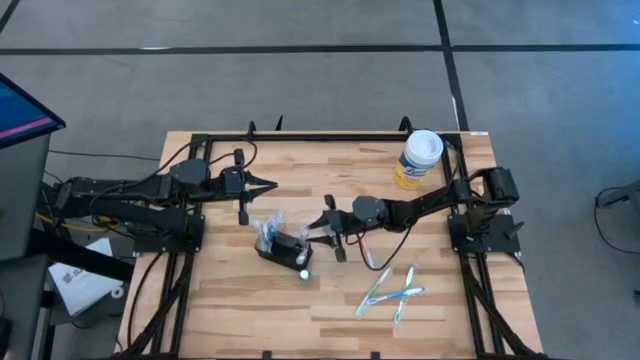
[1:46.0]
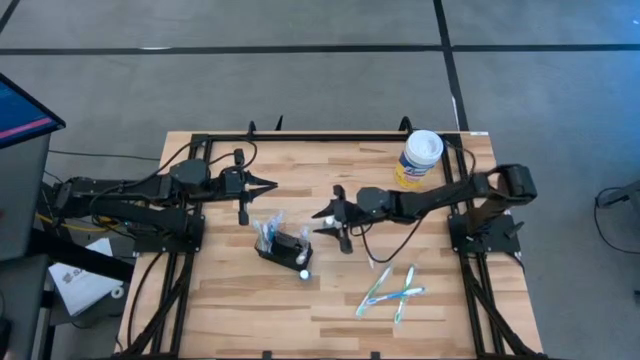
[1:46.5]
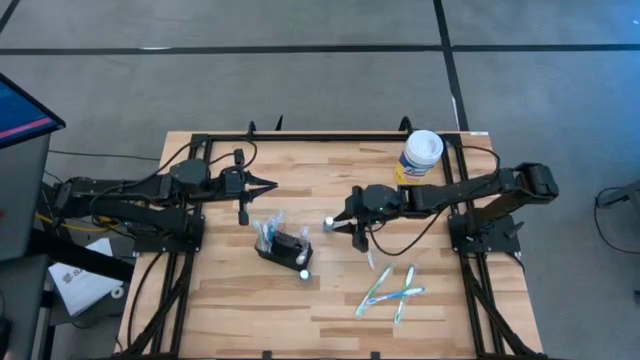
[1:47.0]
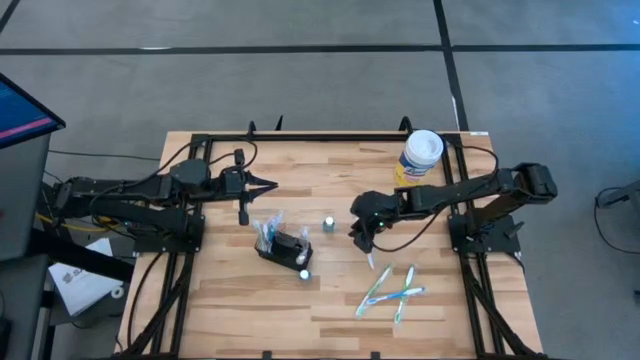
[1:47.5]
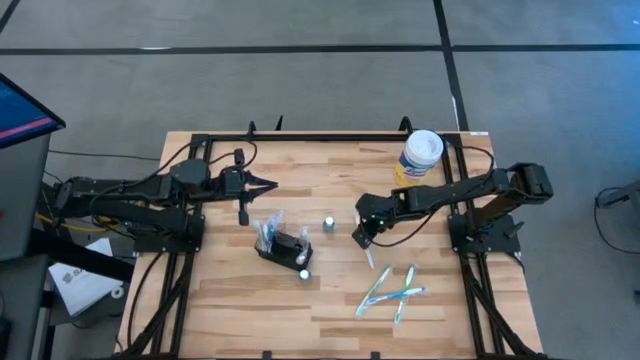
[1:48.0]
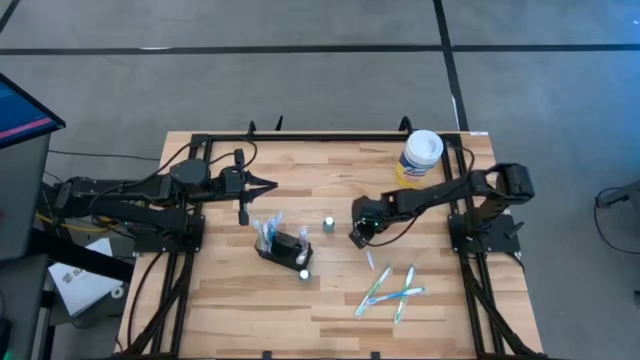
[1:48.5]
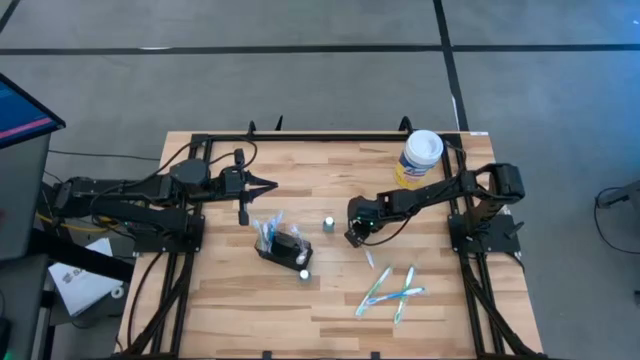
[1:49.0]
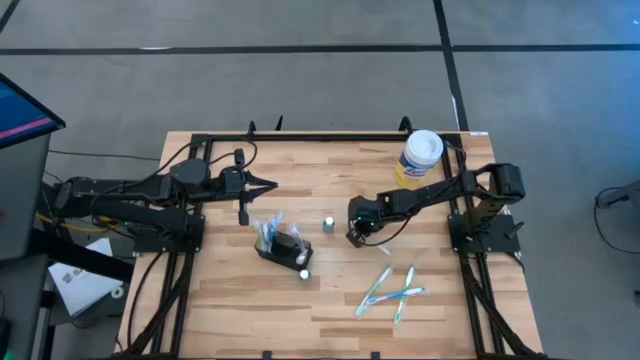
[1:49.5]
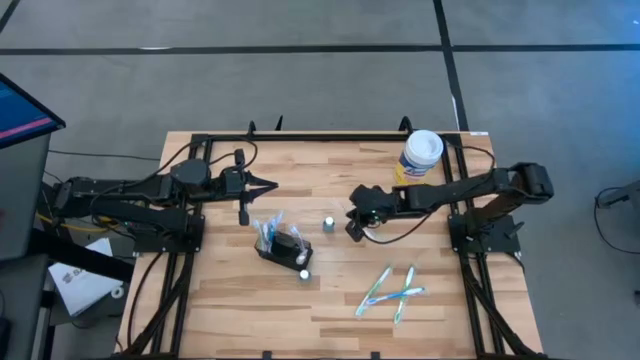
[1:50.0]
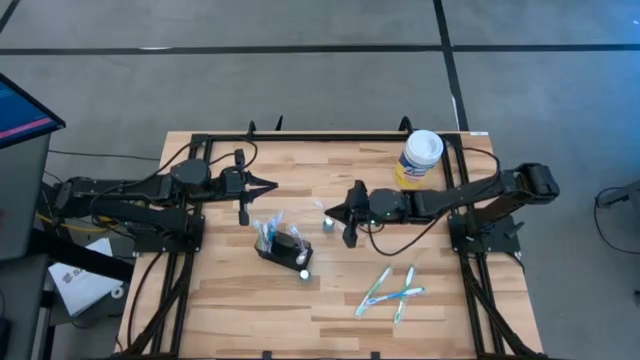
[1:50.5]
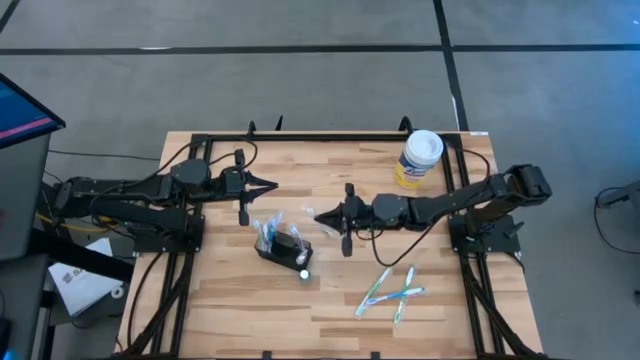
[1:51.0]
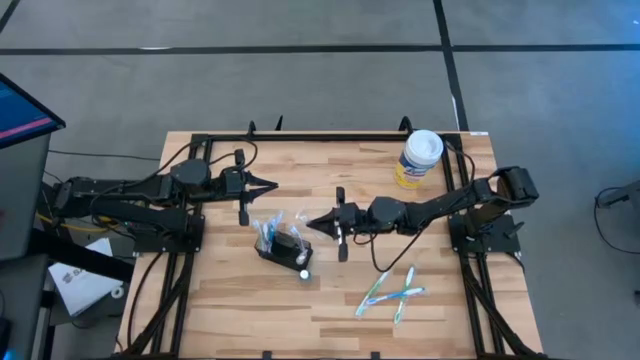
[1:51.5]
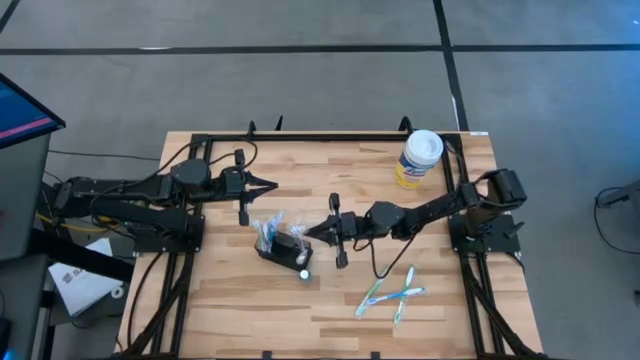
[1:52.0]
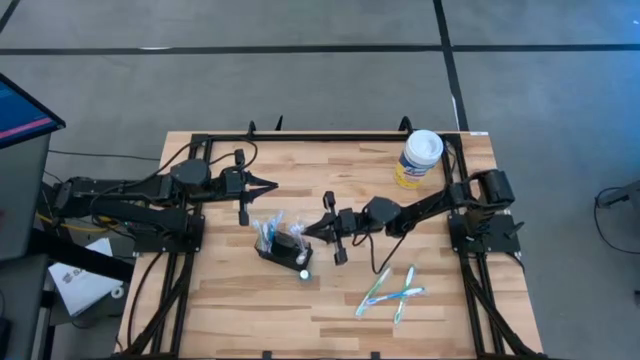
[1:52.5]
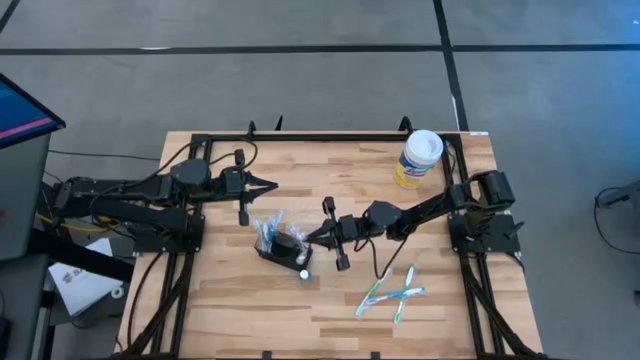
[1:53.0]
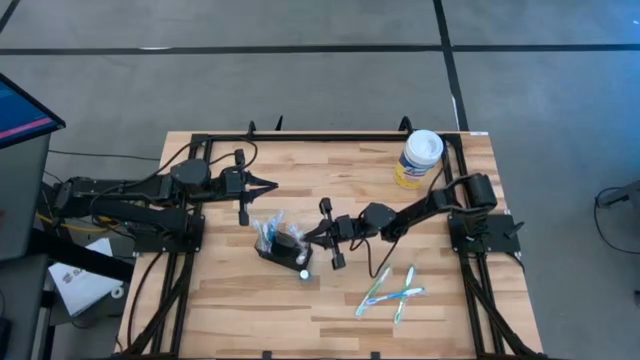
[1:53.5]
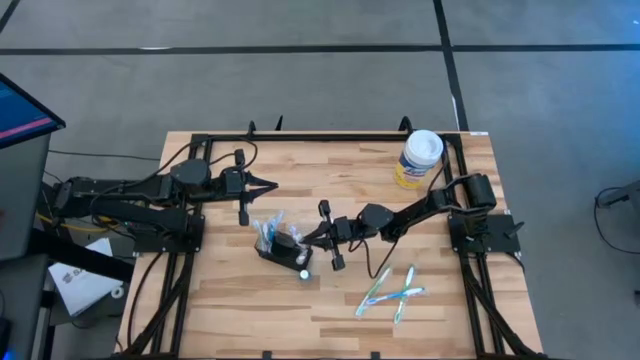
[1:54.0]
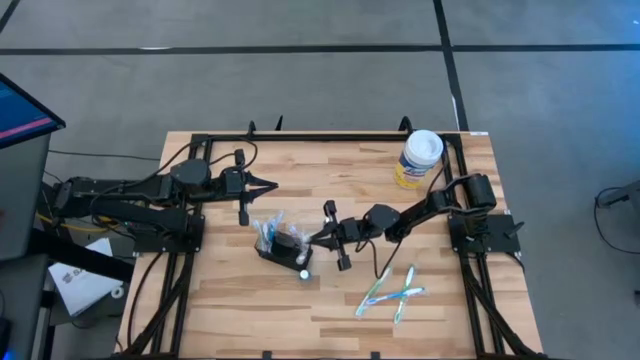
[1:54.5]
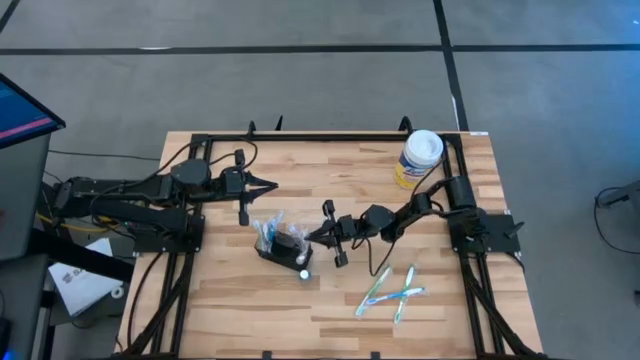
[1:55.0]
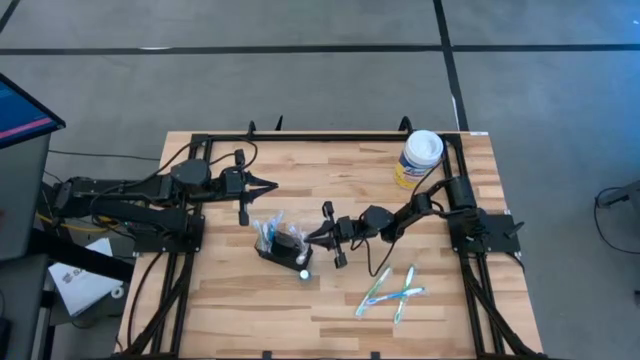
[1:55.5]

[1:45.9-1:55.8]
Task: Pick & Place toothbrushing station
Put the orange toothbrush into the right compartment of the wire organizer

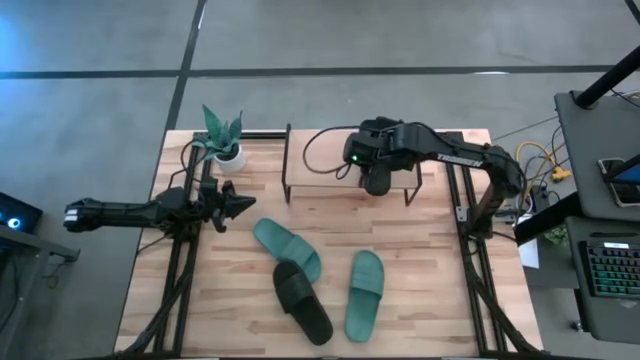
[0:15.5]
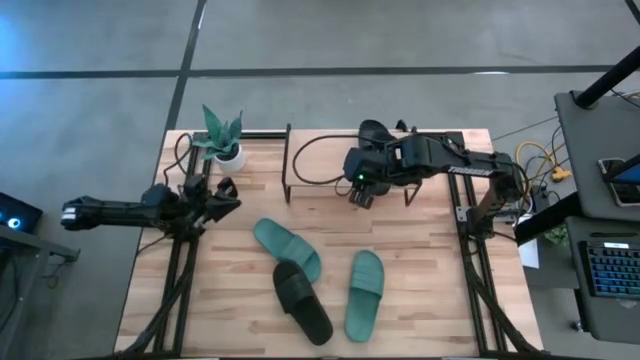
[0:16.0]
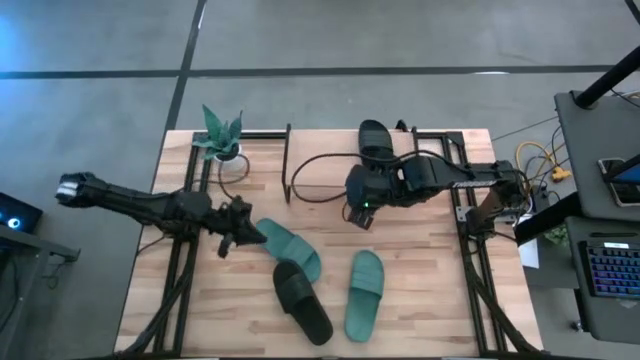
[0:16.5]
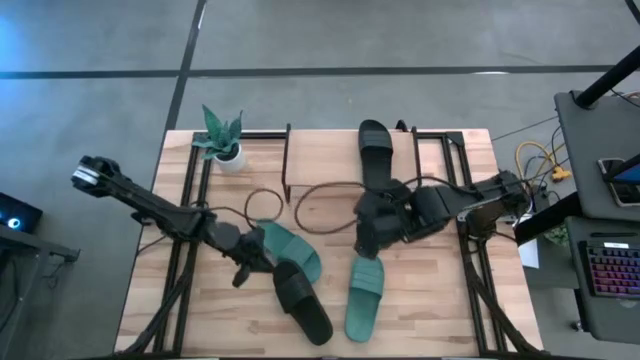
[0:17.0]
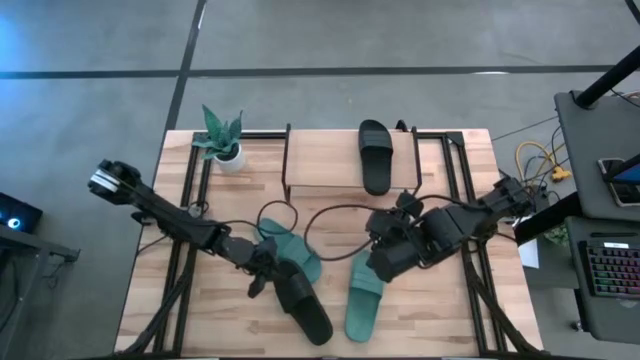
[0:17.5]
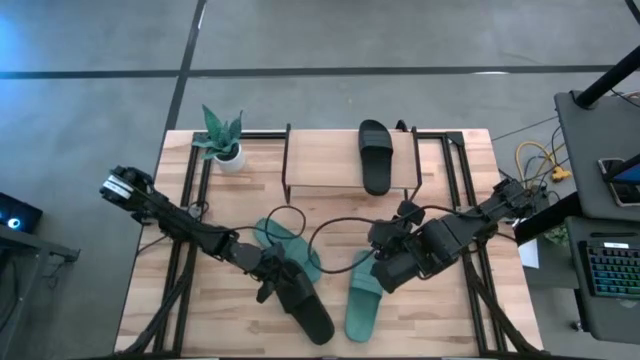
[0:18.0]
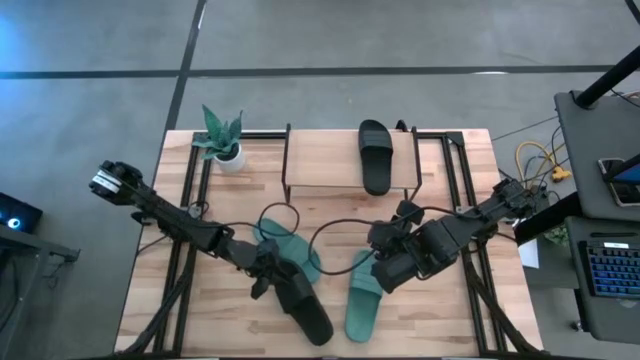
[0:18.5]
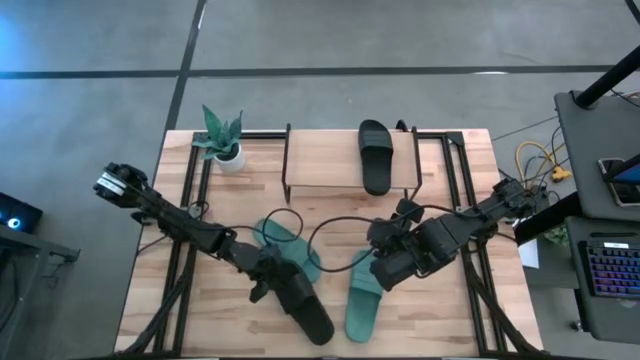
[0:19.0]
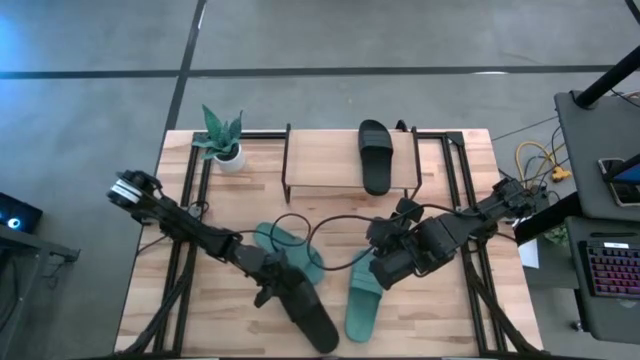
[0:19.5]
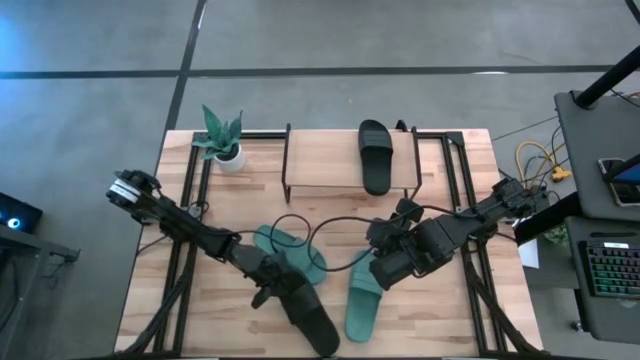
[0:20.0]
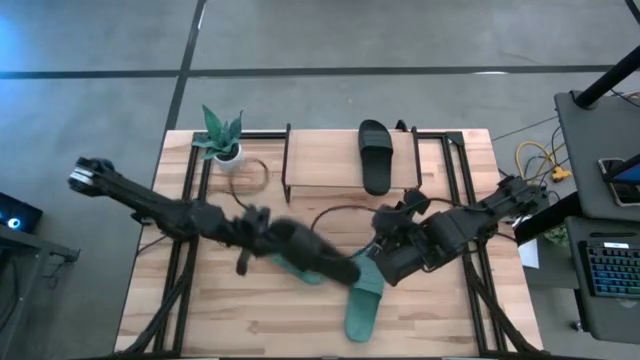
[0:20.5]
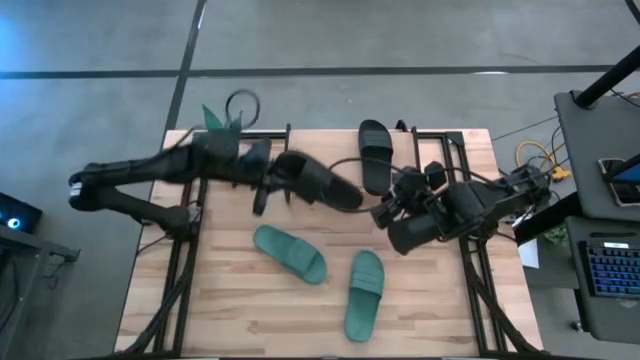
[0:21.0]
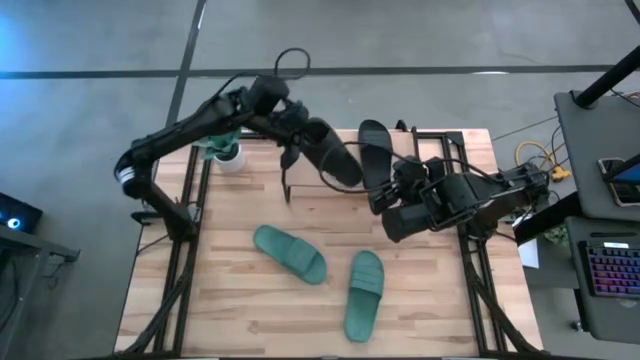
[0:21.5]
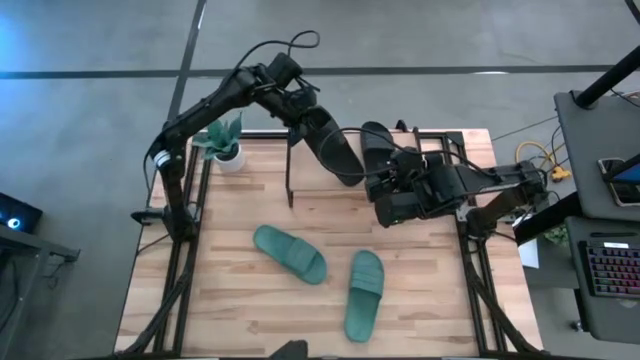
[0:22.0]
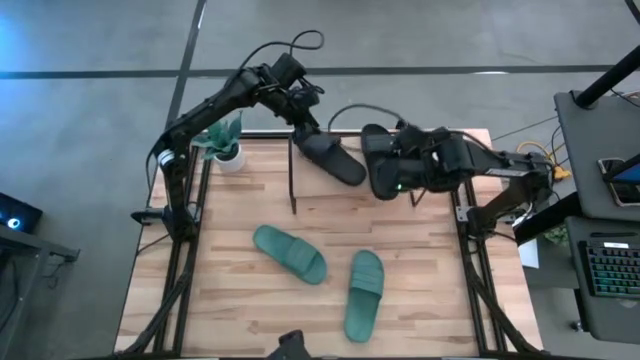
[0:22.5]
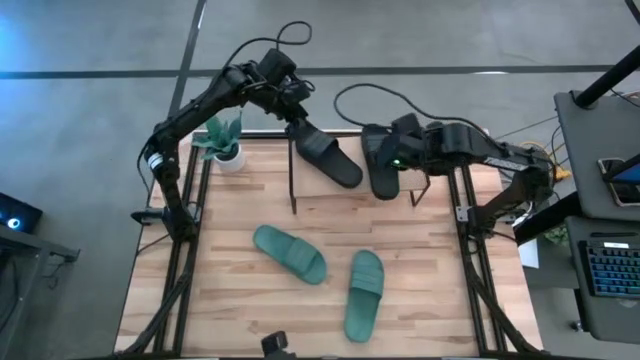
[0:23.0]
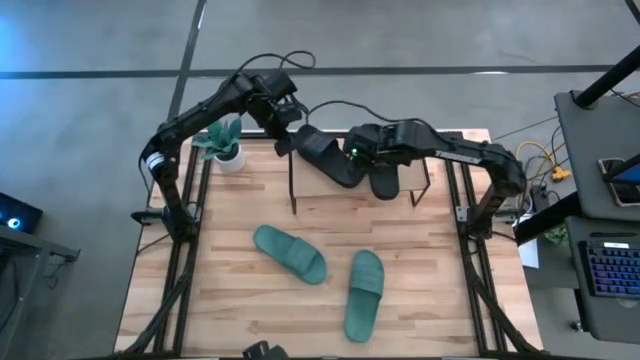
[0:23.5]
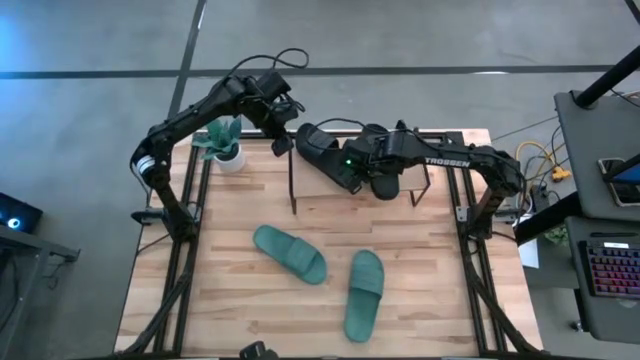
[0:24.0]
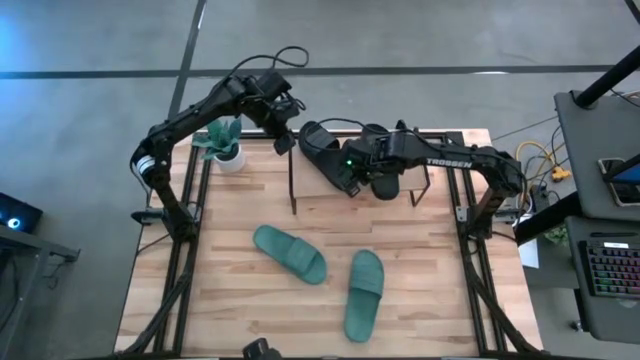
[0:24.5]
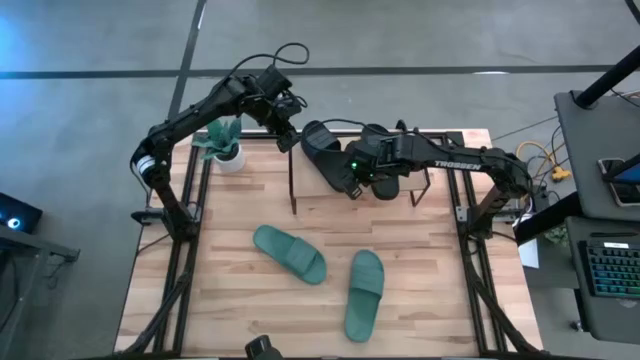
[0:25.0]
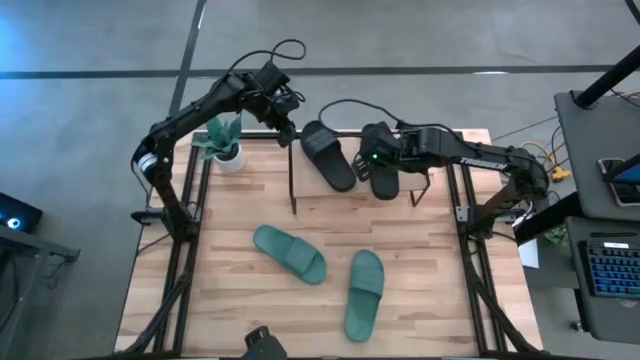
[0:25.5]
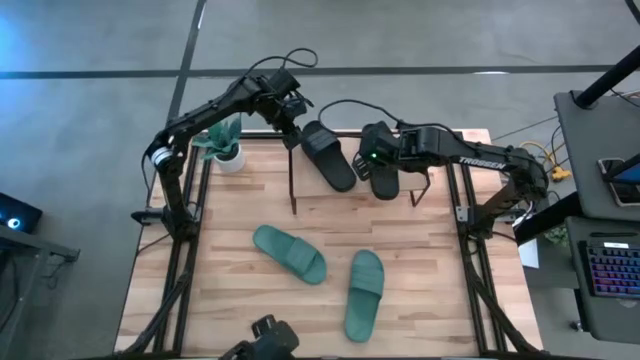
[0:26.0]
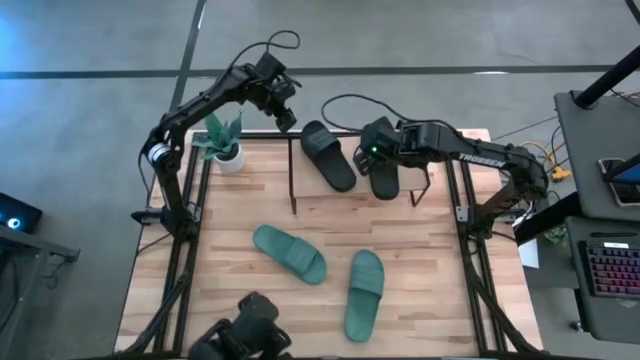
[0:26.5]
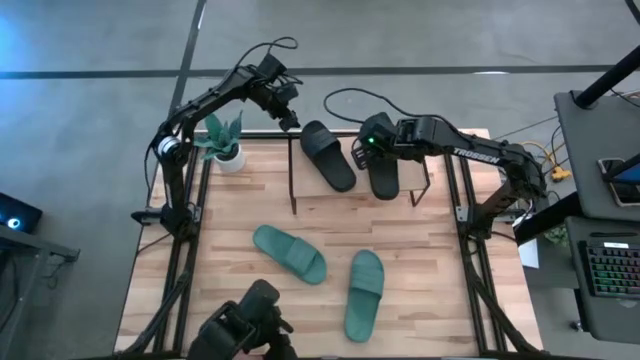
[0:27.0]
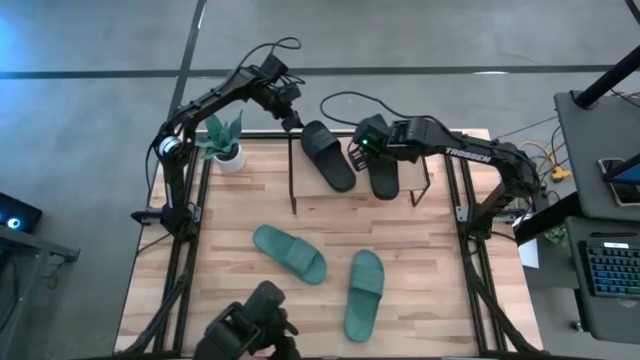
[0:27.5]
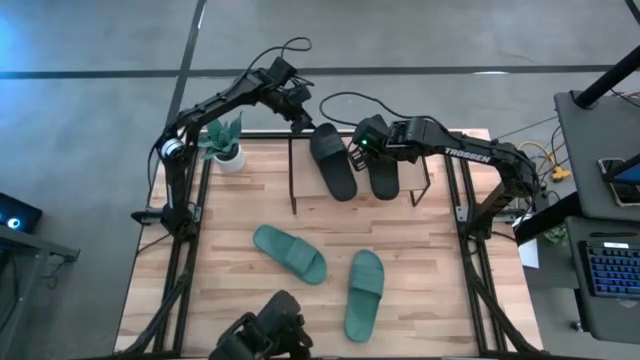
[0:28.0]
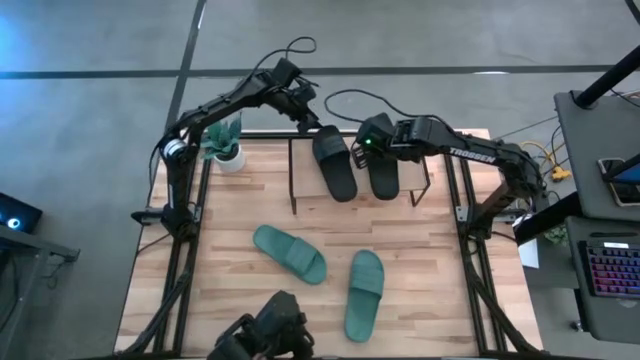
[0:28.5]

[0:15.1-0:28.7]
Task: Pick and place slides into the shelf
Put the black slide on the shelf
